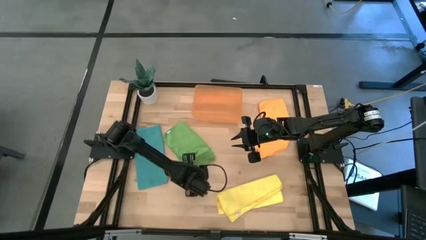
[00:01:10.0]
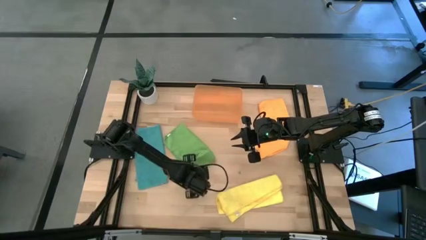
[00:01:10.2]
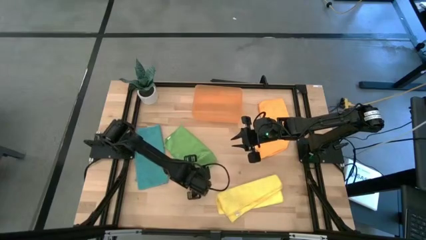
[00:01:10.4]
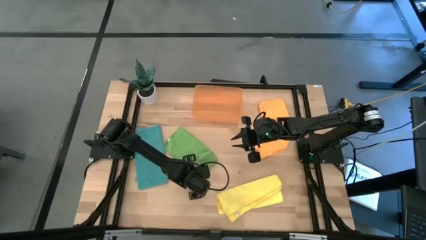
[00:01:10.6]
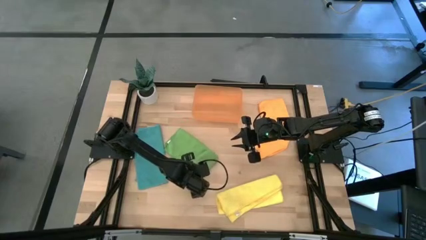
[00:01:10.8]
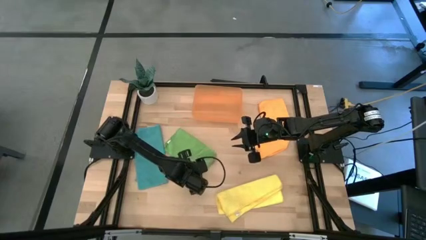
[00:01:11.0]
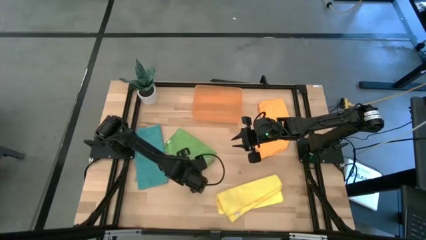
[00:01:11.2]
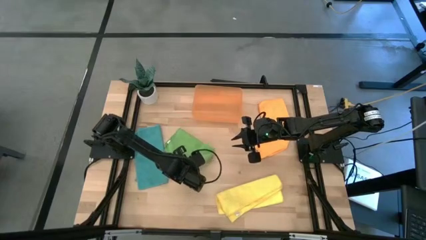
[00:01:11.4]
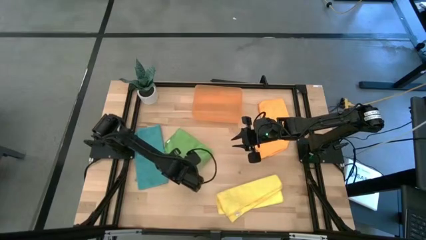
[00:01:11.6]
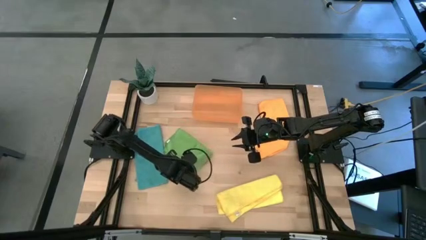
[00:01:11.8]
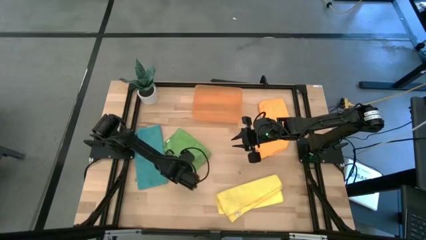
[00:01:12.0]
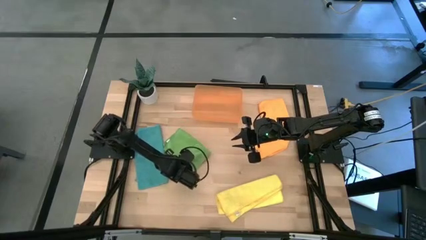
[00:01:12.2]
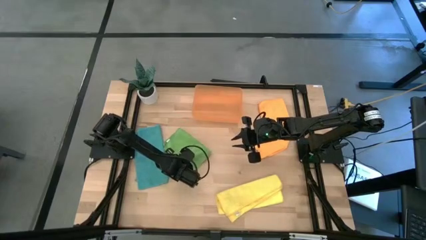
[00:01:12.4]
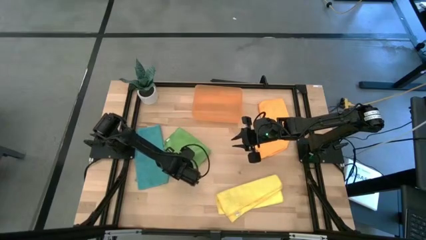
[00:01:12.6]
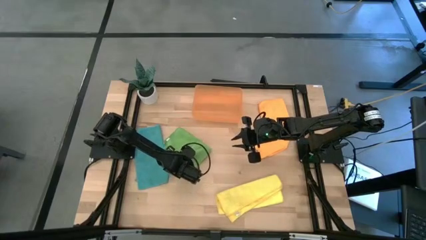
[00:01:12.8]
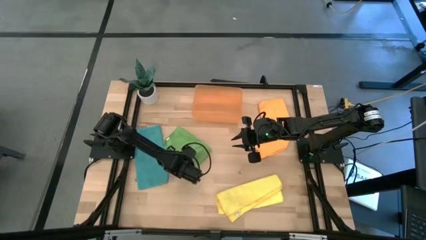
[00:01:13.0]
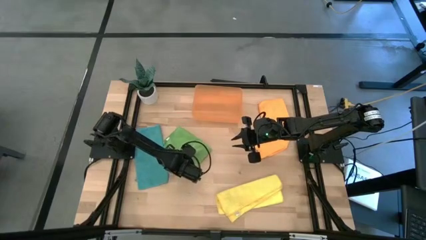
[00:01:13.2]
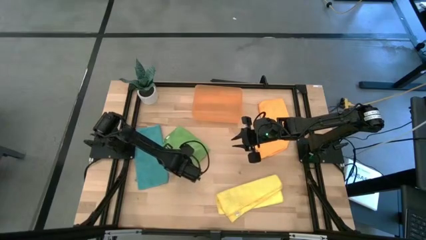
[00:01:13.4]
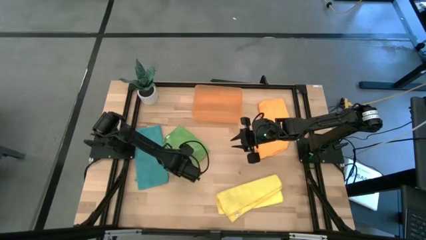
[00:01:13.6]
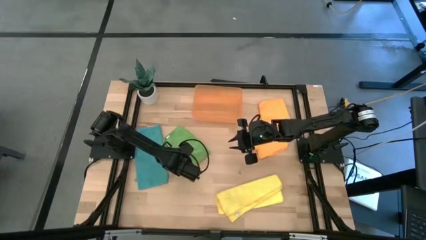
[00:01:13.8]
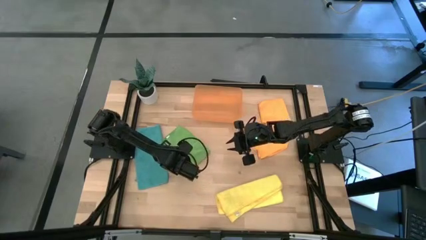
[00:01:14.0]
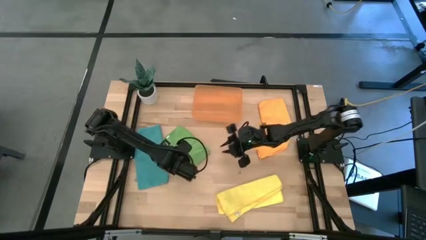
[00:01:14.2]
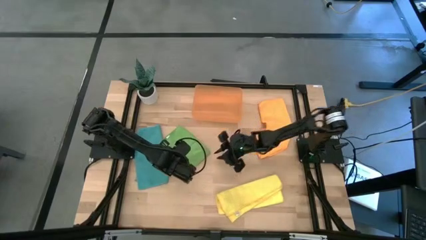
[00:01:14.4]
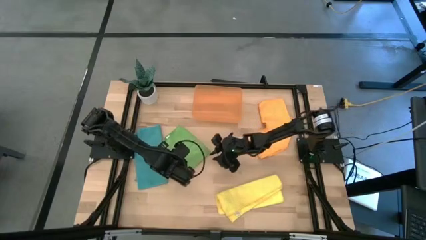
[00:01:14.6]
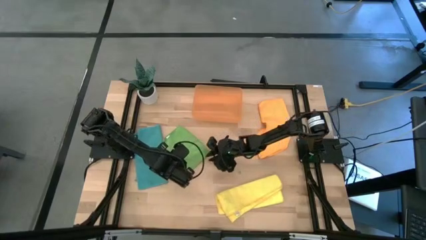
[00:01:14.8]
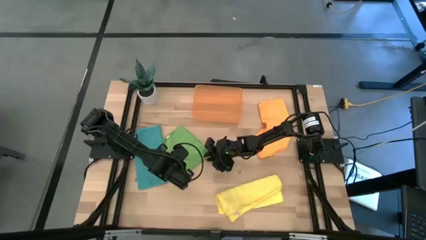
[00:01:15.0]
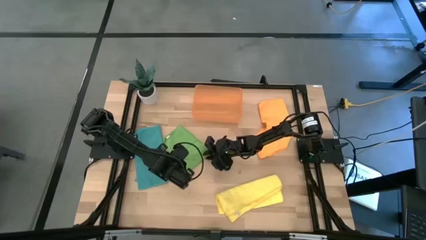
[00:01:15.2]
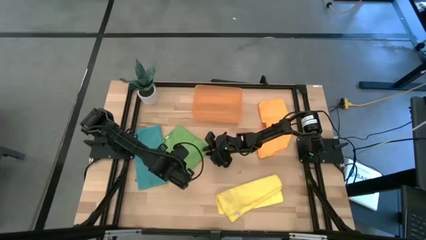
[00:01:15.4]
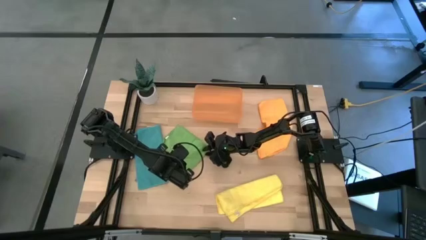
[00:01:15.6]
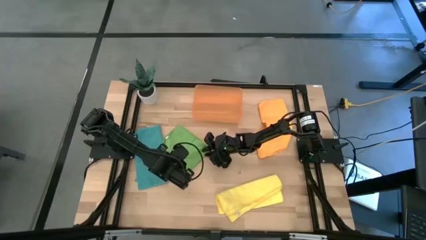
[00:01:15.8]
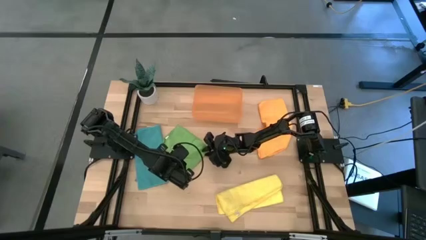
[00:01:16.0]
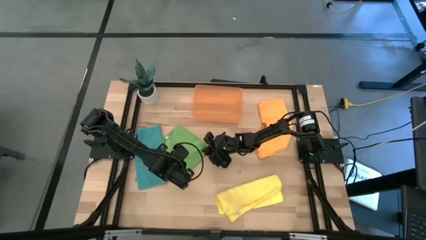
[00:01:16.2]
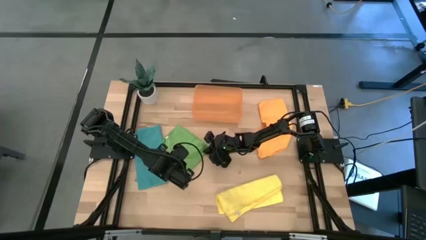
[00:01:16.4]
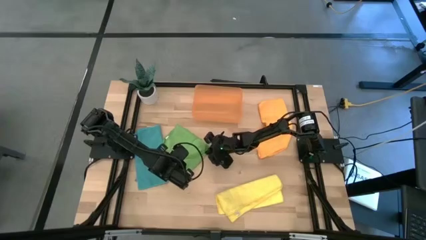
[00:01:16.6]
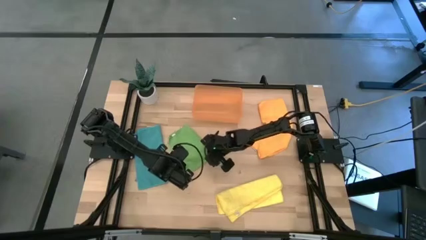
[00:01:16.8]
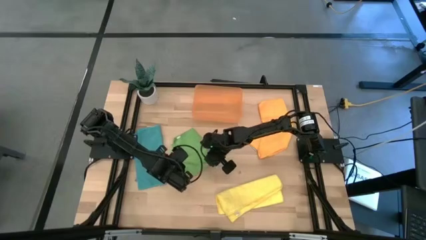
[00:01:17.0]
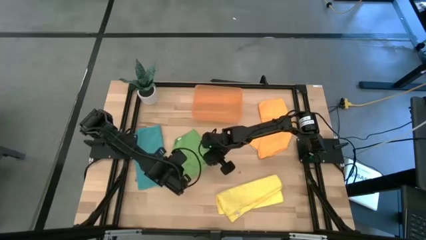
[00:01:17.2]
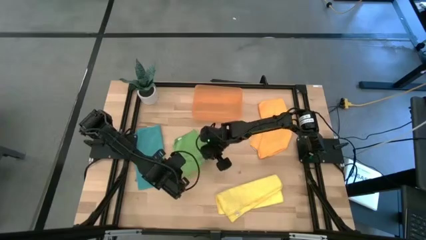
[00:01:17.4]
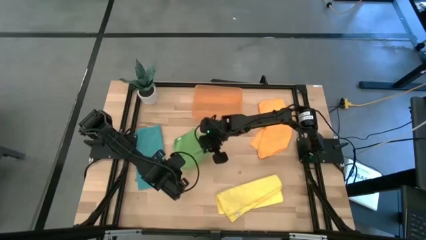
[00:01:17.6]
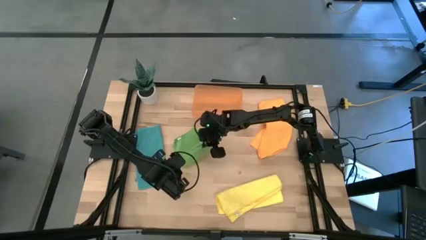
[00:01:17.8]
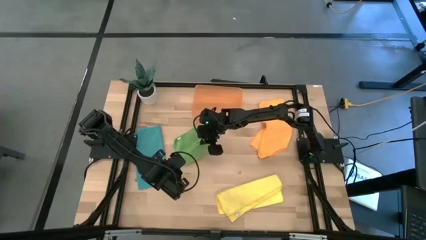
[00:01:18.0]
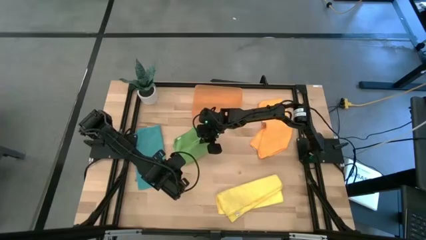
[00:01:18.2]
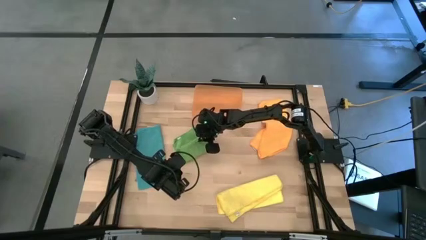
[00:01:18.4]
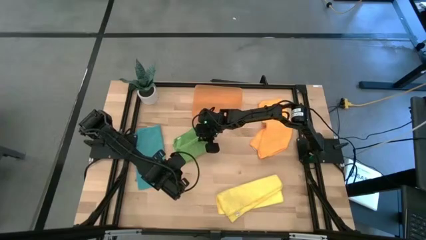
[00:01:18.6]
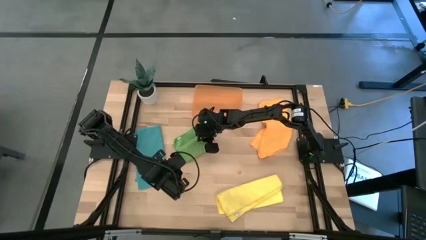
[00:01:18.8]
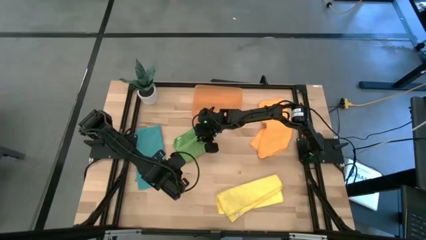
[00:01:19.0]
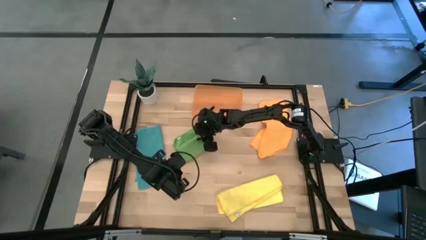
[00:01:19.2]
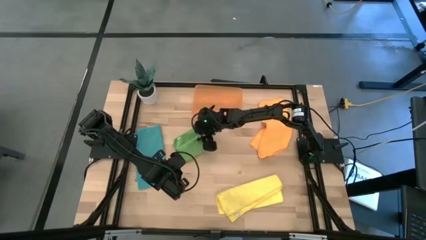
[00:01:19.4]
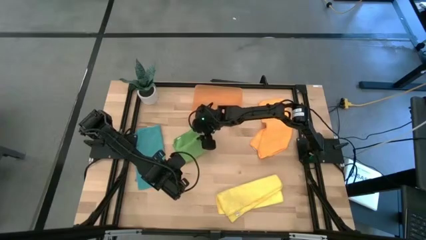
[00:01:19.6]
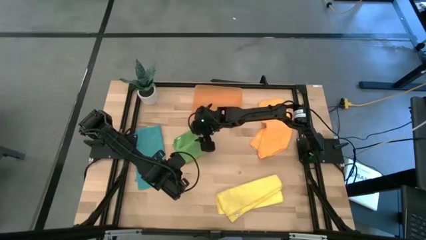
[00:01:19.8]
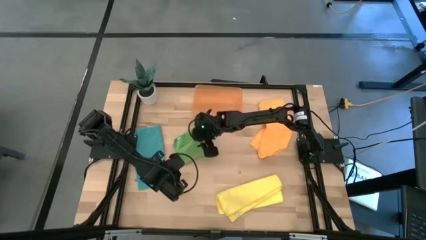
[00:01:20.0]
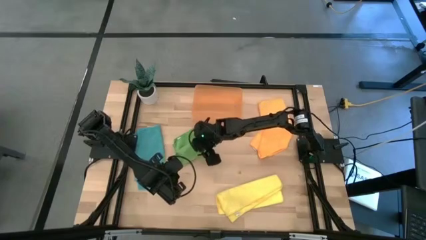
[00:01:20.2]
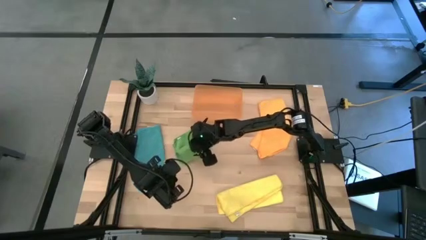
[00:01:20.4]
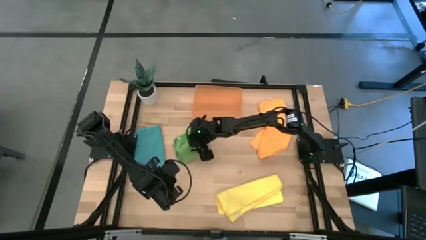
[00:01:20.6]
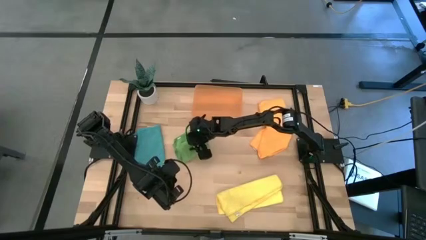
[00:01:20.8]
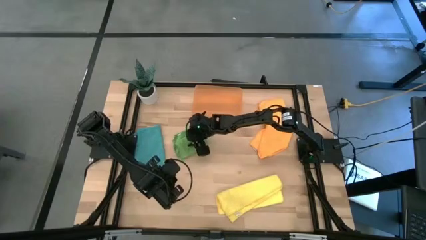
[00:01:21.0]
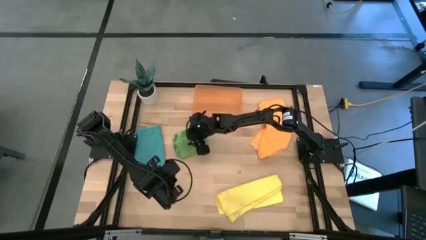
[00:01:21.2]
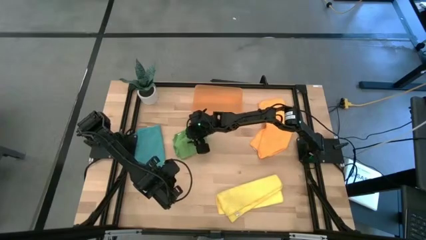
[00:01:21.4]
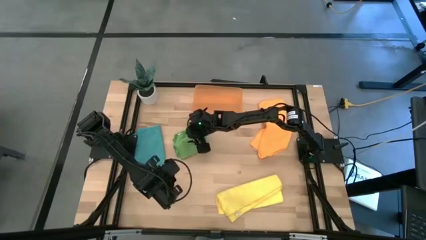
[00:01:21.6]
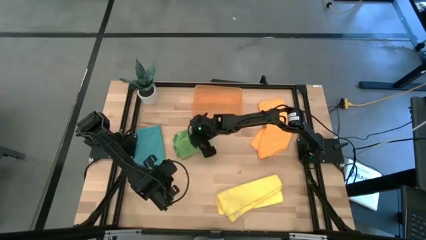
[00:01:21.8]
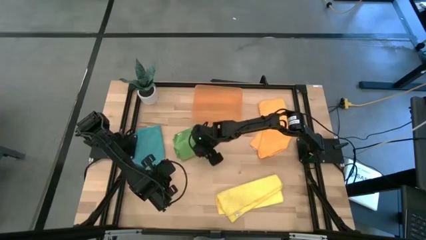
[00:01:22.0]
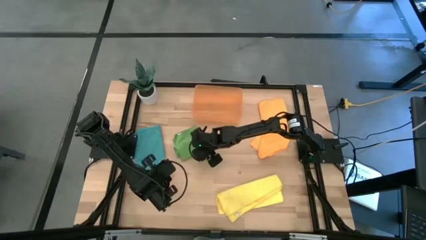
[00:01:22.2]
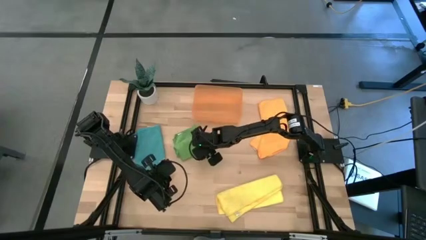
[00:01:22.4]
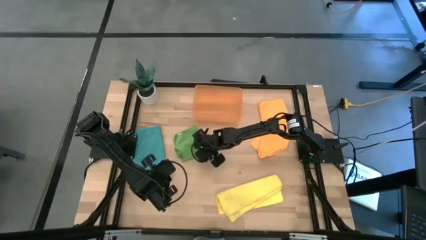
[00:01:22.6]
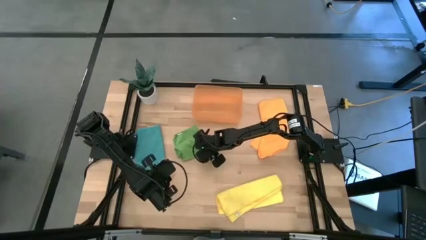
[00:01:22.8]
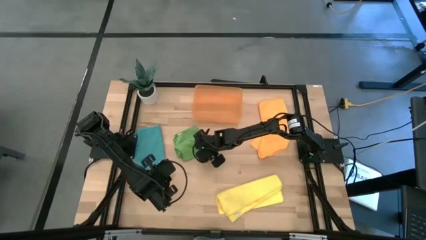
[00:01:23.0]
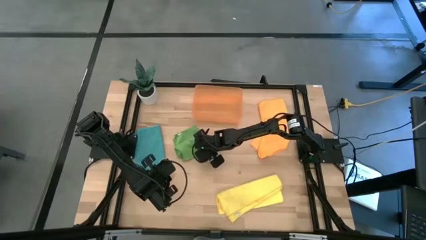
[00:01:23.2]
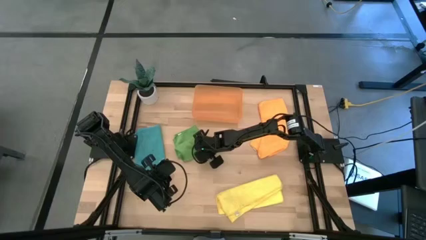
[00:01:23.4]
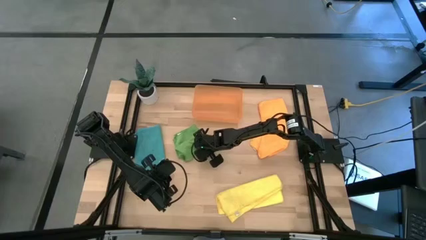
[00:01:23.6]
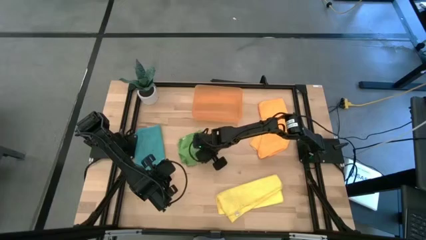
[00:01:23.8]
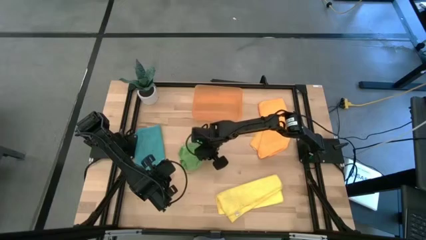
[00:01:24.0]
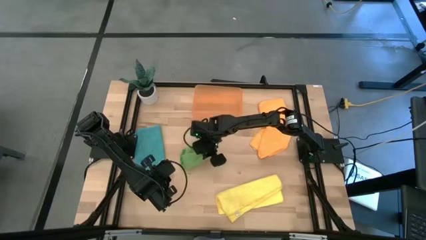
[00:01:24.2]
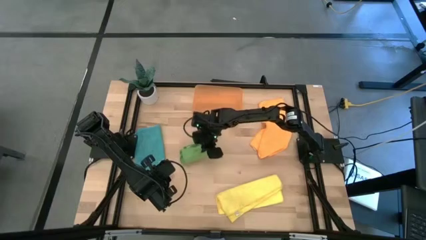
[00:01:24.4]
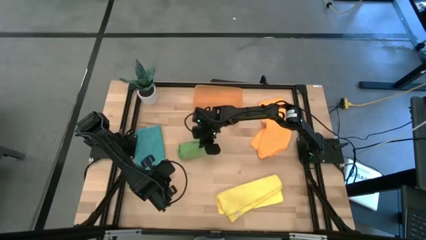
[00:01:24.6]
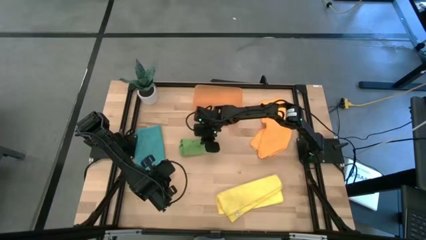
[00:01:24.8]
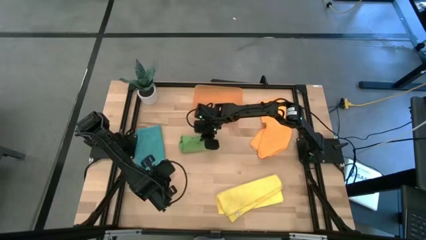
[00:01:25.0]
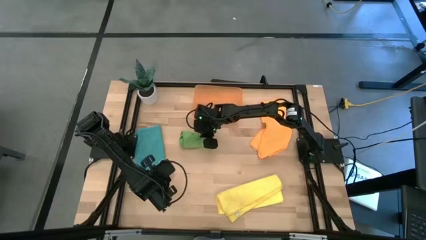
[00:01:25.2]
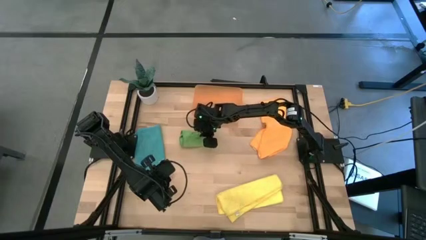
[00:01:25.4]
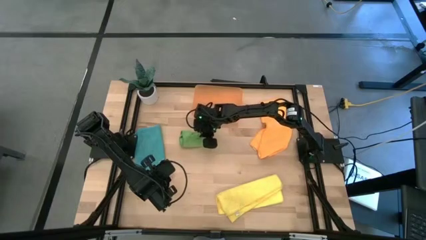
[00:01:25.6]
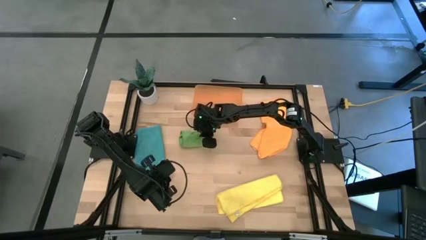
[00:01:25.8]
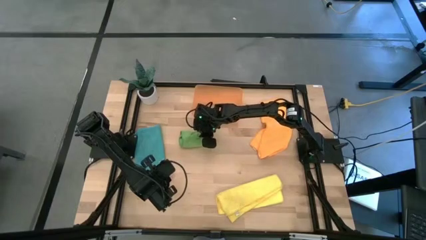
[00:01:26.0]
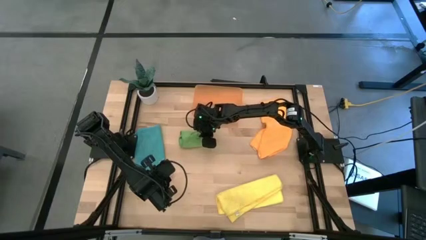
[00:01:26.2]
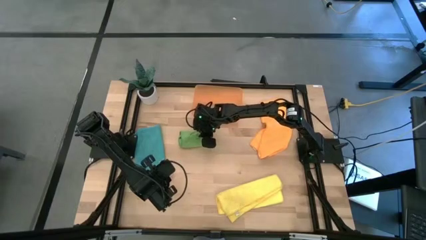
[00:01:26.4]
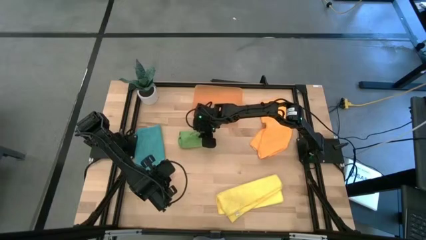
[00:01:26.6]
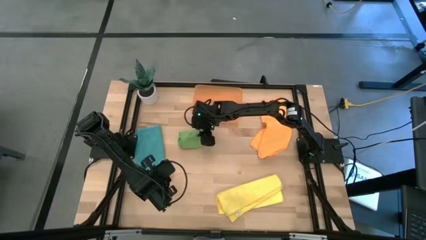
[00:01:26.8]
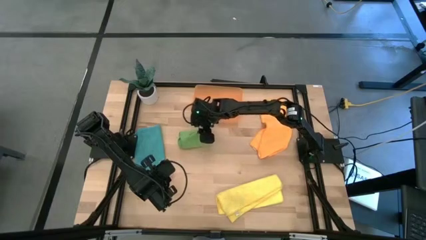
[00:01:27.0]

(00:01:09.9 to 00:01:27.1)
Task: Roll microfiber towels into tight, uniform cylinder then place into a basket
Roll the green microfiber cloth
